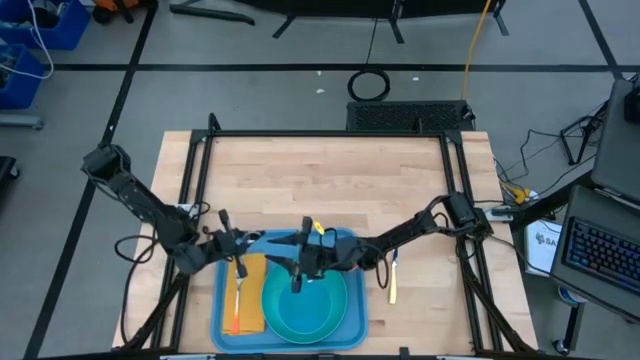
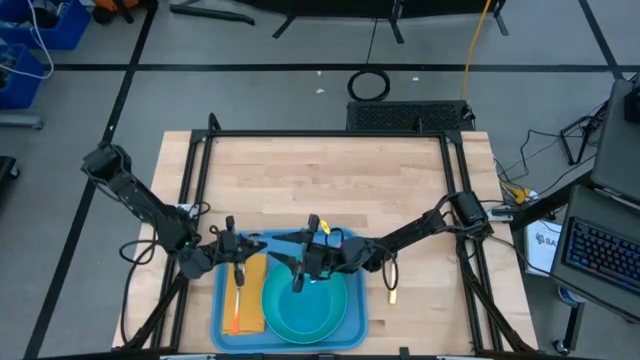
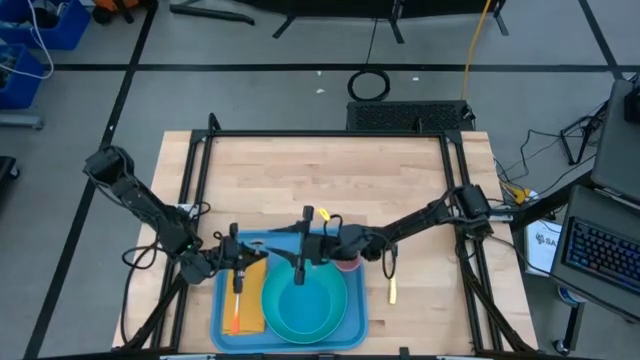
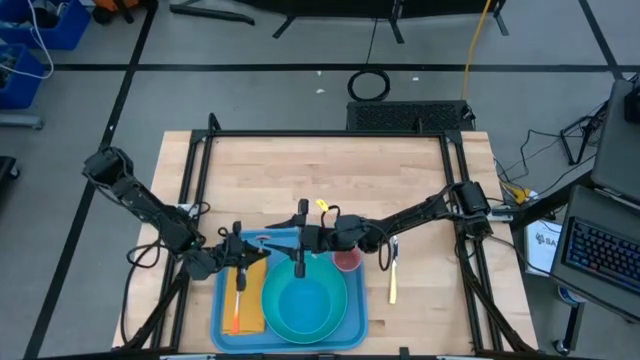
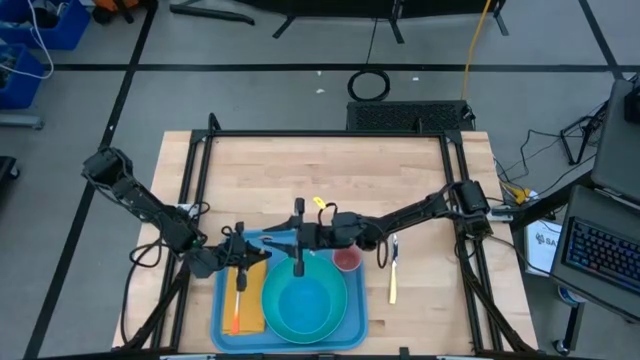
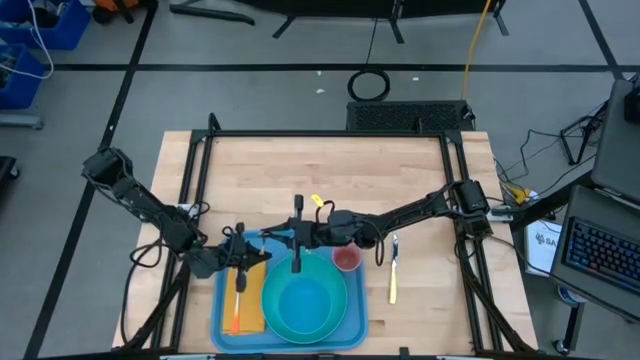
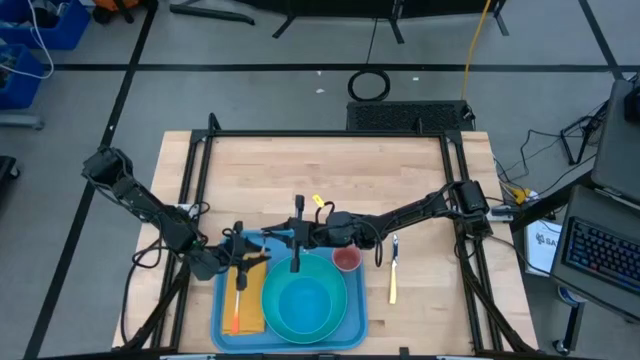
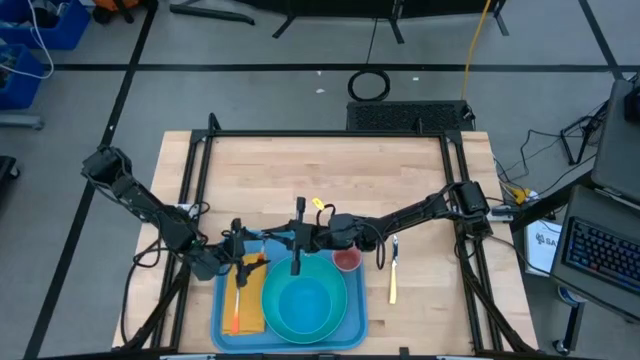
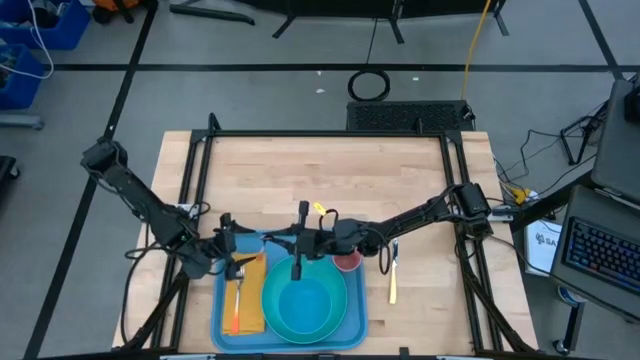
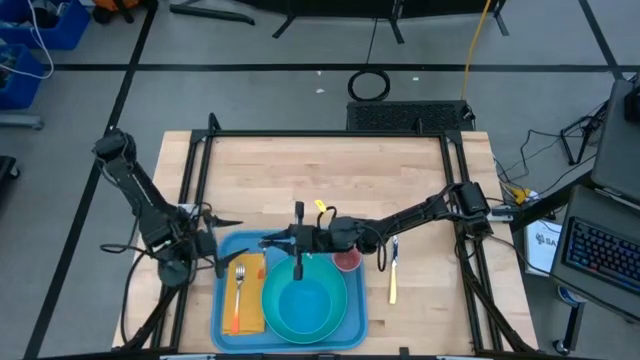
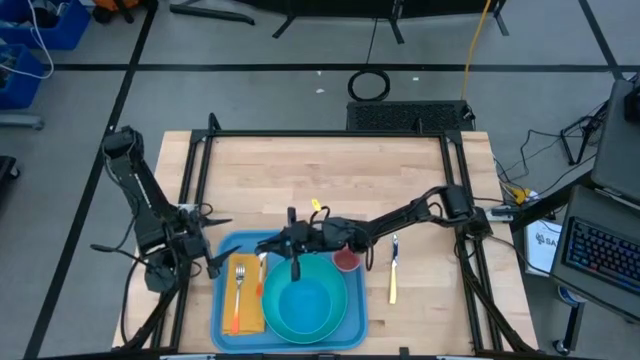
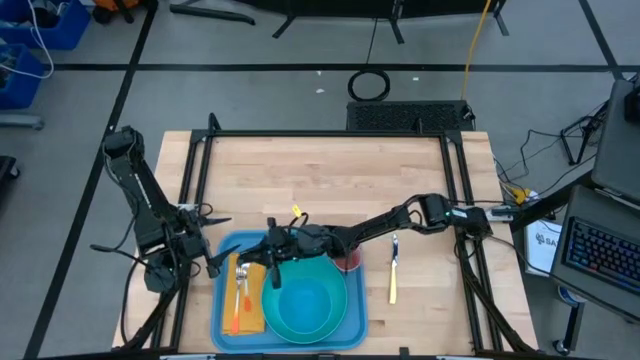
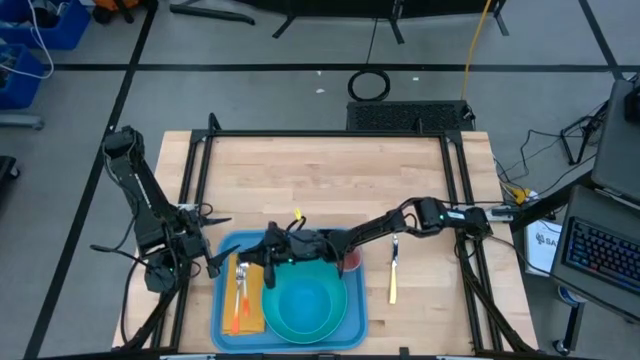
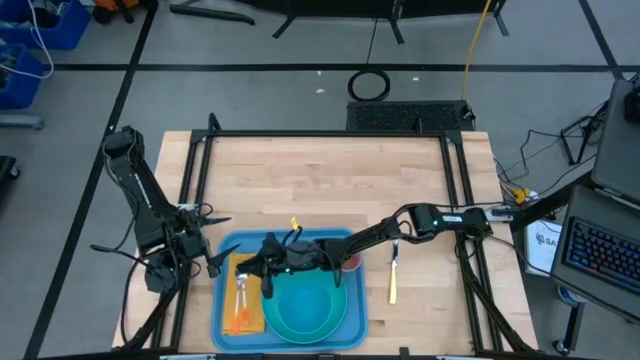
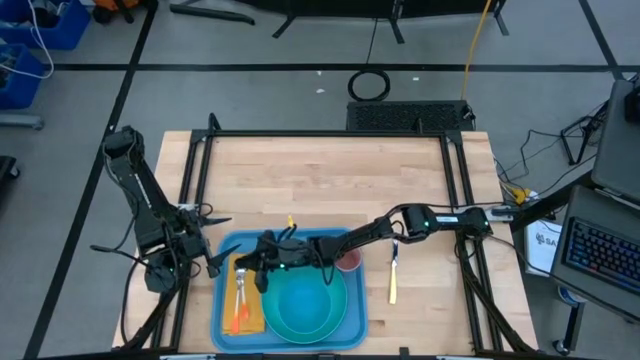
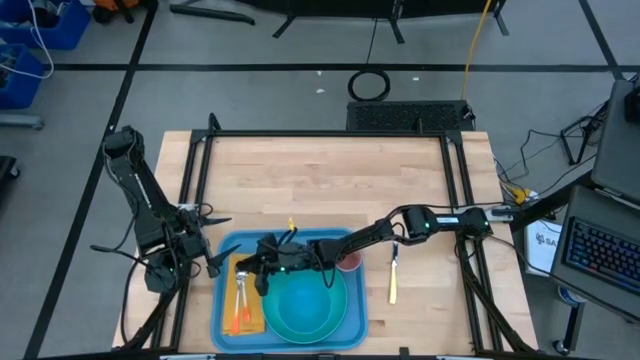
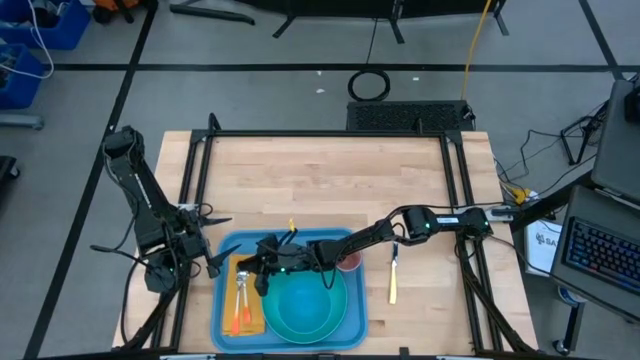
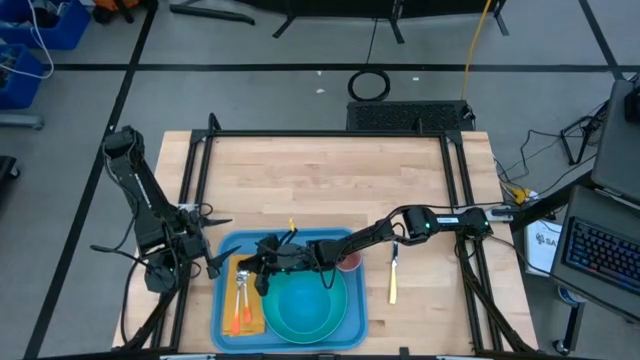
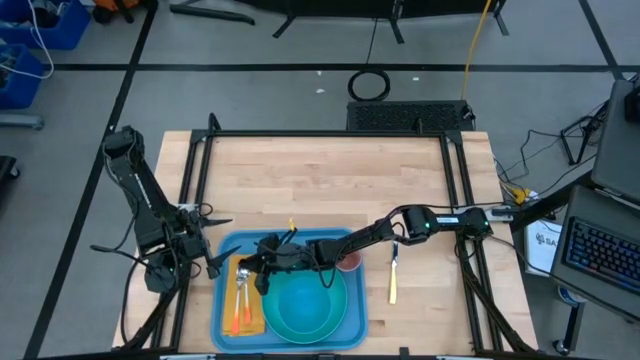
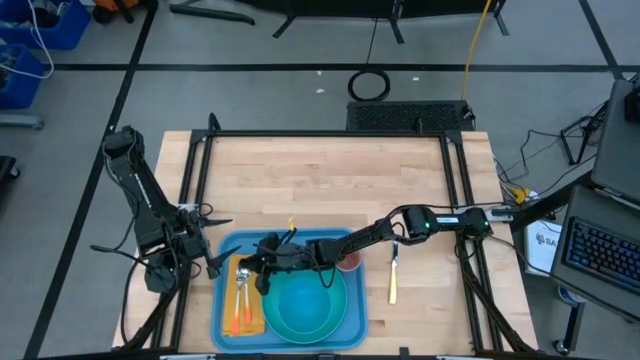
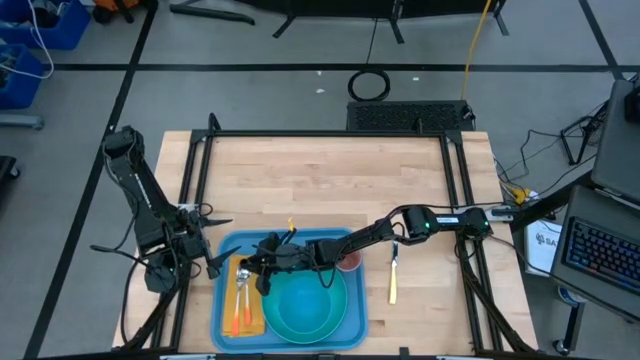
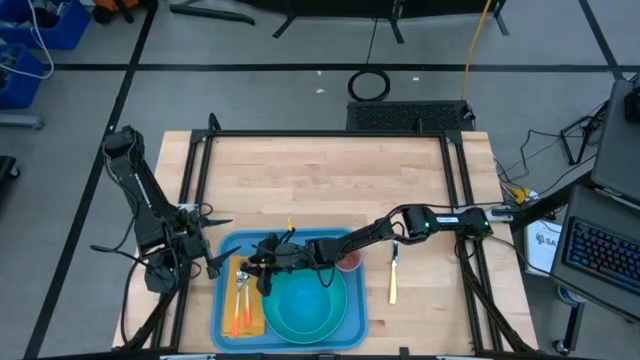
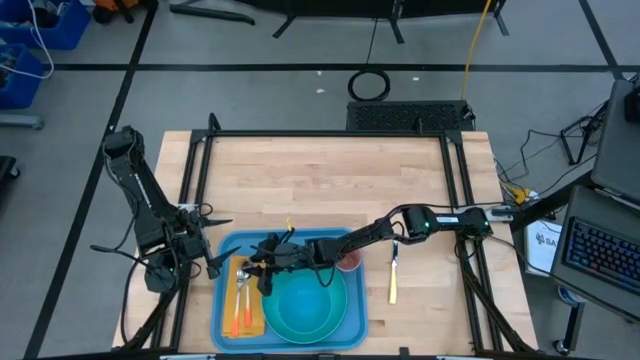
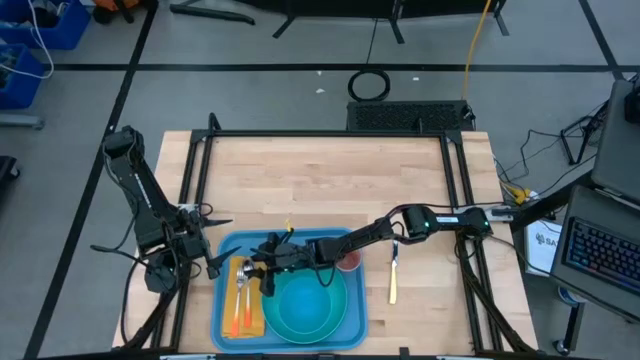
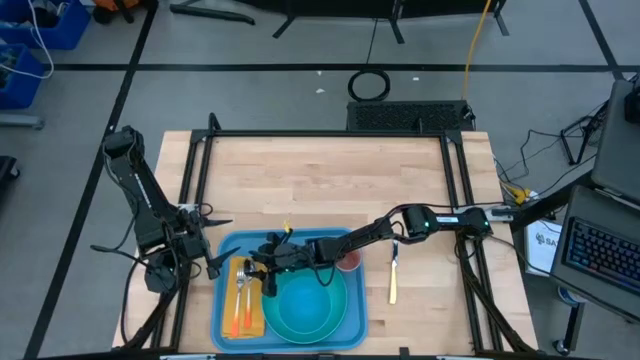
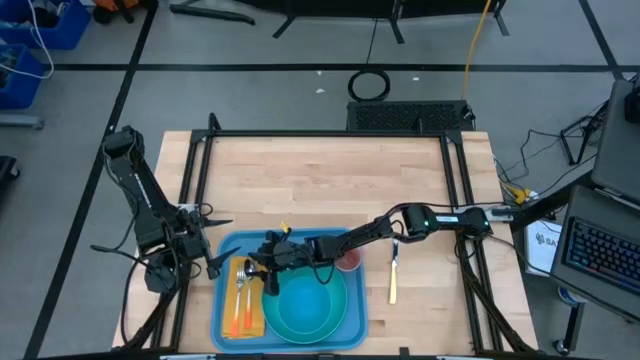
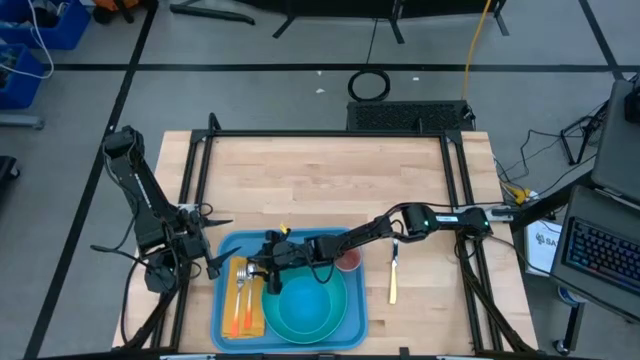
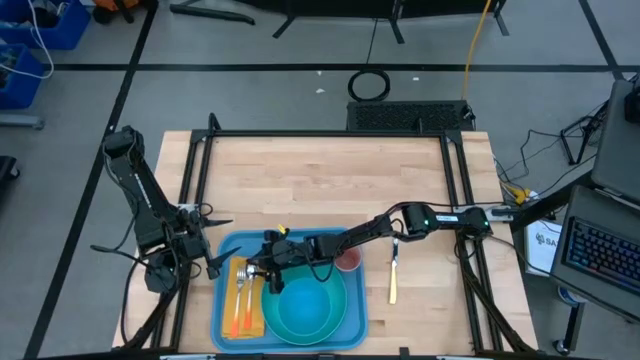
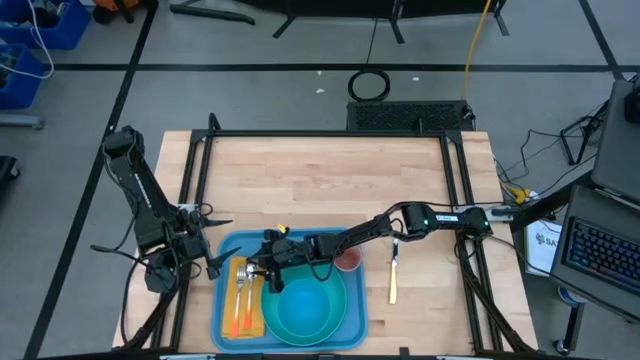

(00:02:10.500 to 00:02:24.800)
Task: Set up tray
Put the orange spoon to the right of the orange fork on the yellow table napkin

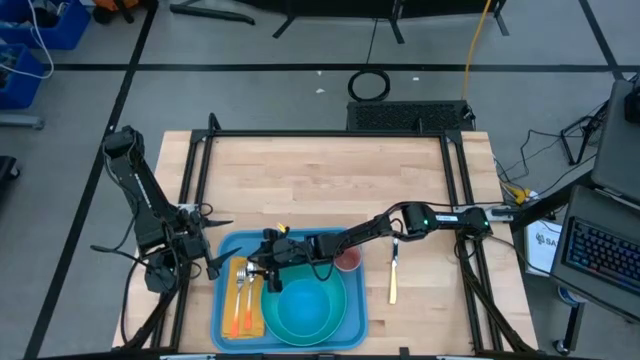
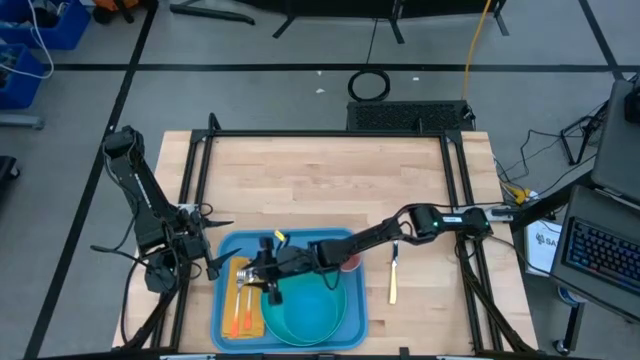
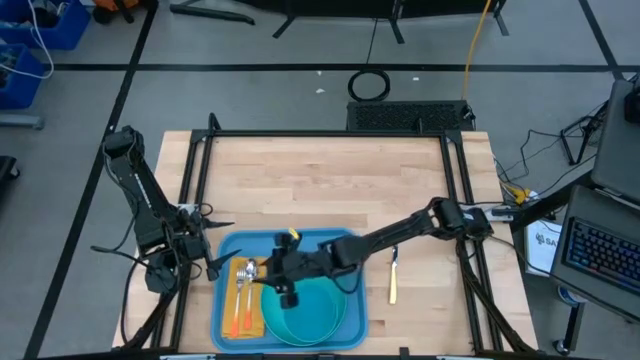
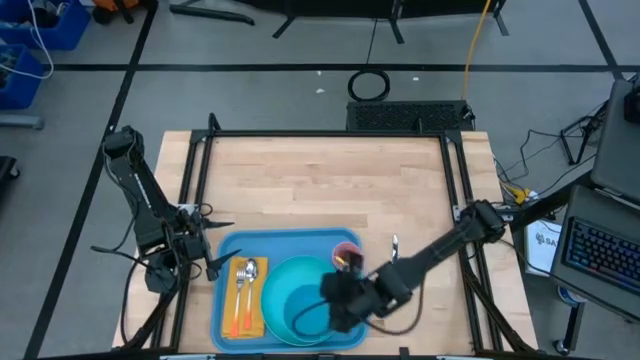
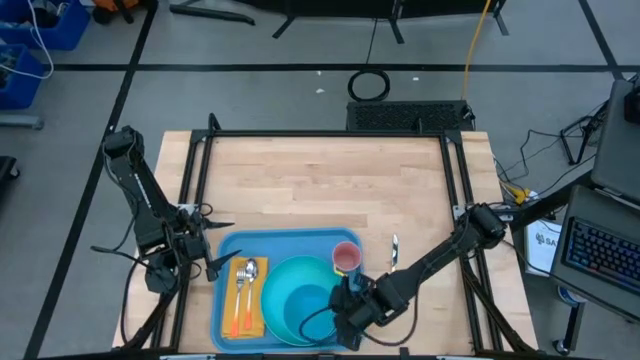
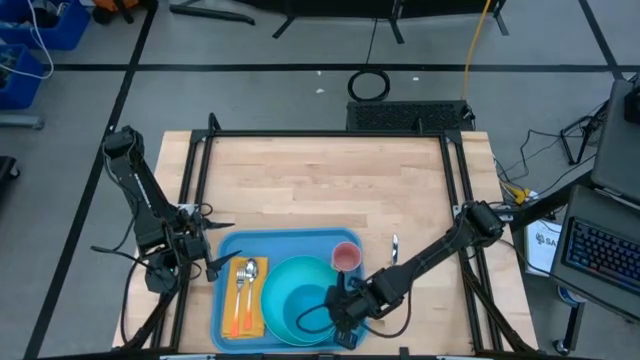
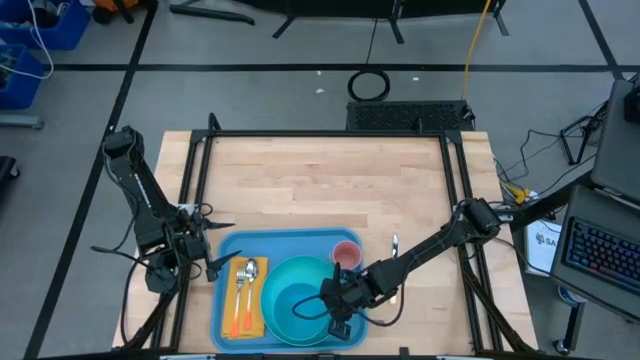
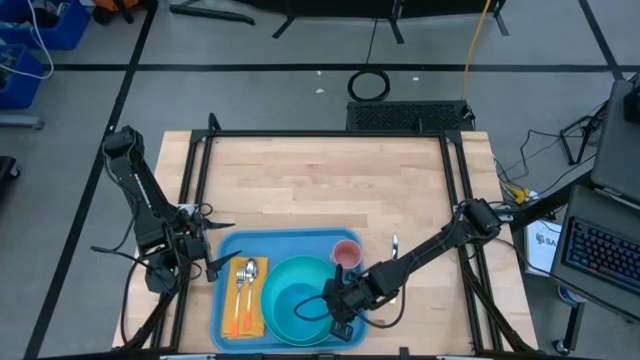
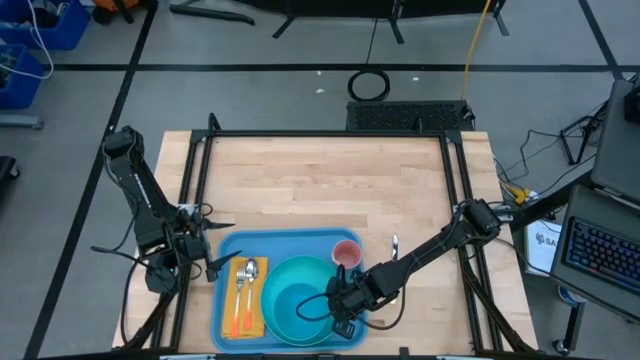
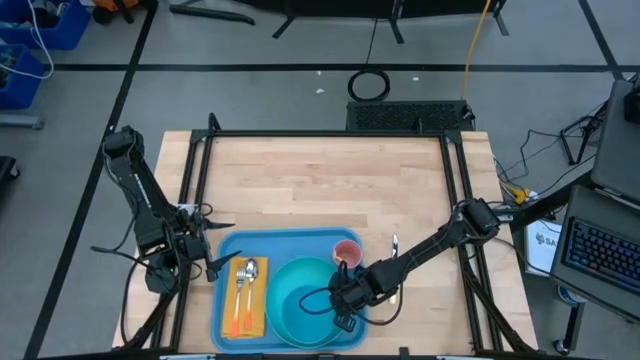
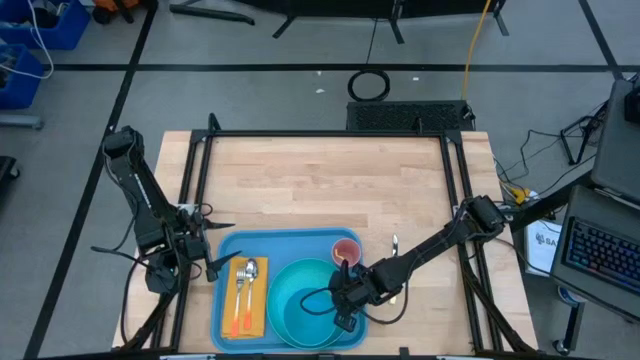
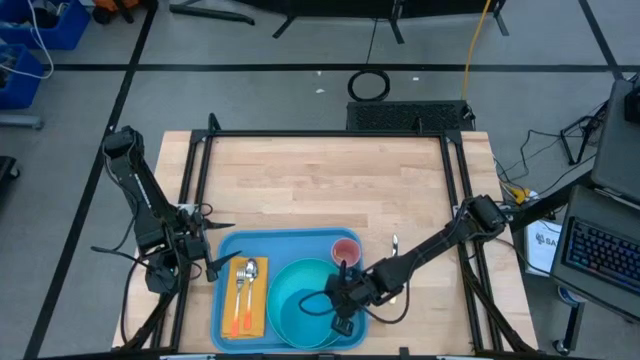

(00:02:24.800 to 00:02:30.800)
Adjust the blue bowl on the green plate in the blue tray
